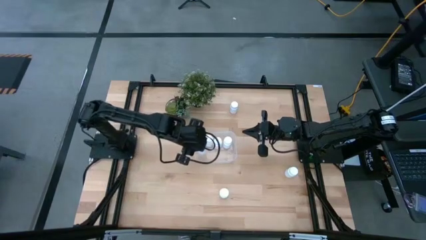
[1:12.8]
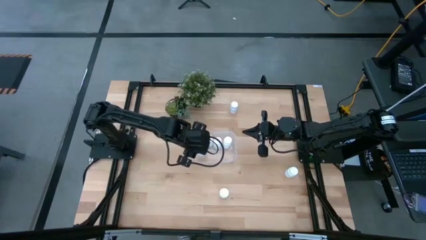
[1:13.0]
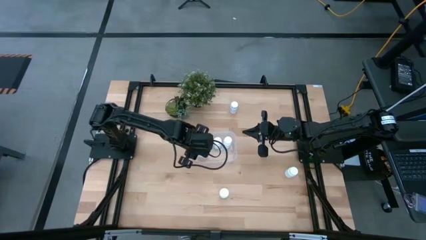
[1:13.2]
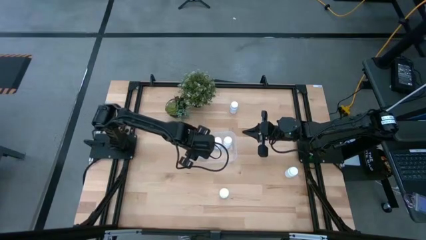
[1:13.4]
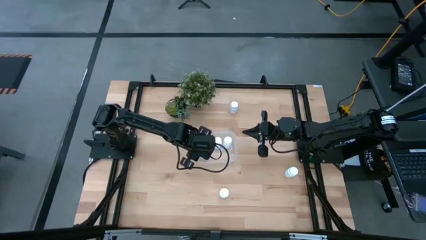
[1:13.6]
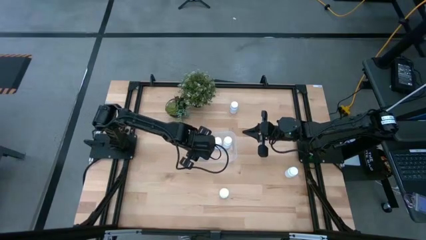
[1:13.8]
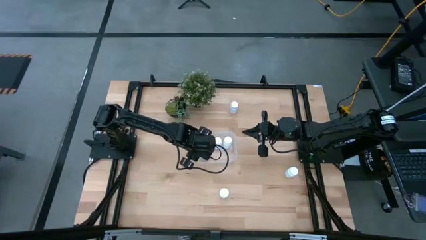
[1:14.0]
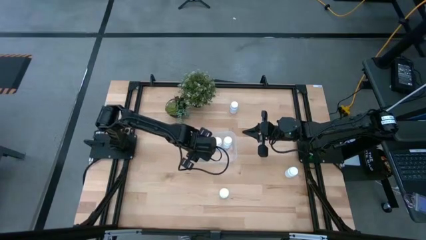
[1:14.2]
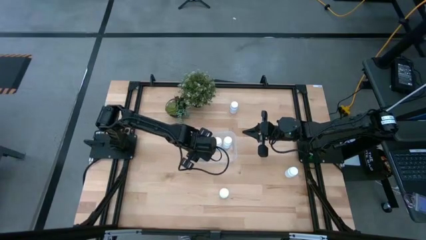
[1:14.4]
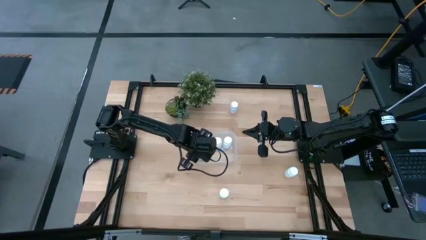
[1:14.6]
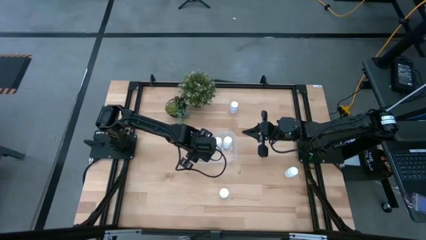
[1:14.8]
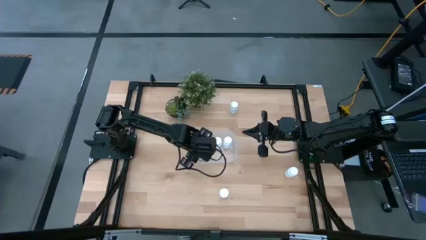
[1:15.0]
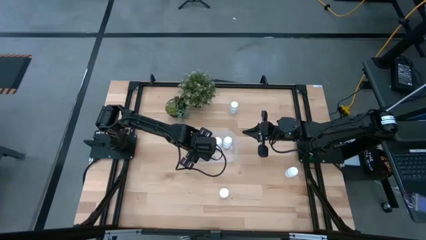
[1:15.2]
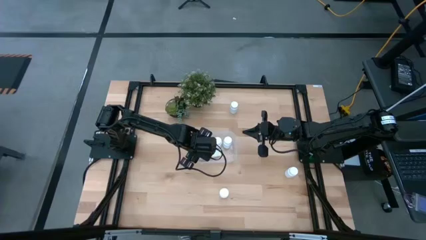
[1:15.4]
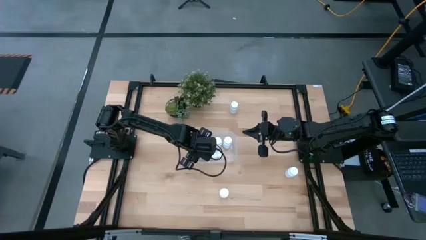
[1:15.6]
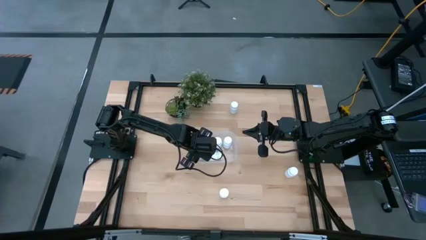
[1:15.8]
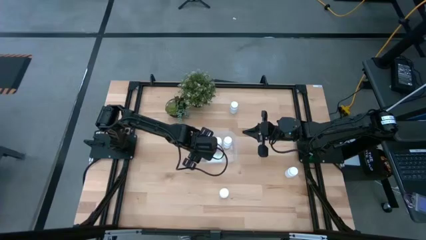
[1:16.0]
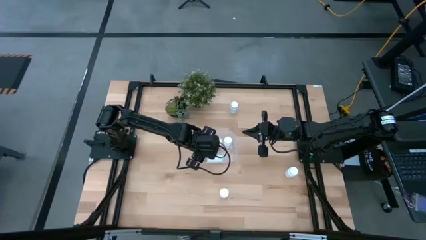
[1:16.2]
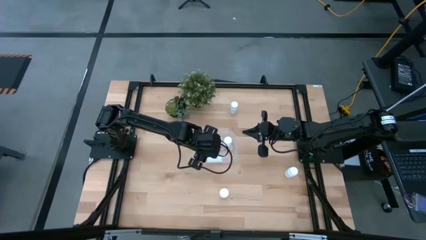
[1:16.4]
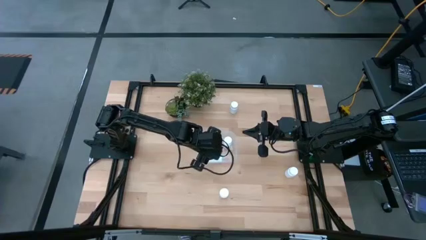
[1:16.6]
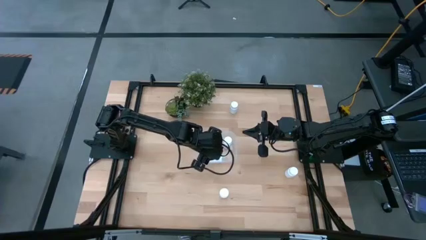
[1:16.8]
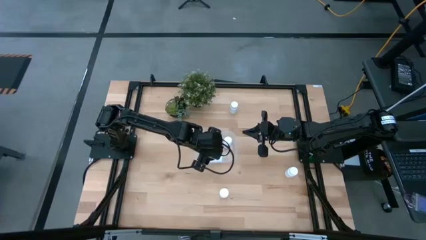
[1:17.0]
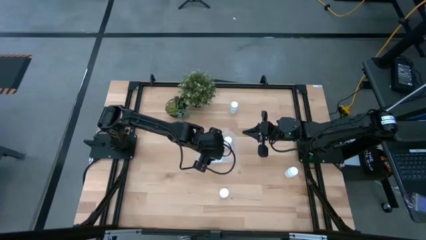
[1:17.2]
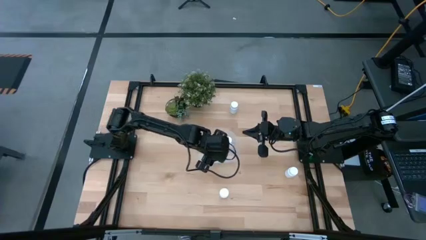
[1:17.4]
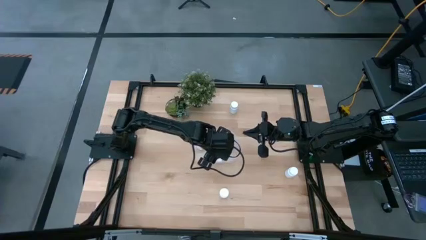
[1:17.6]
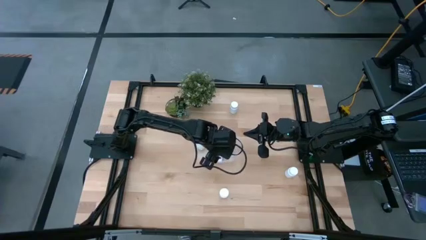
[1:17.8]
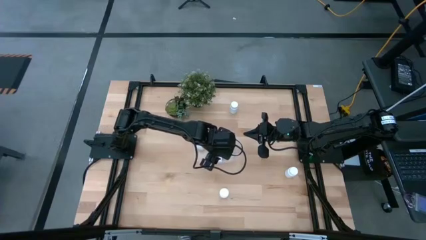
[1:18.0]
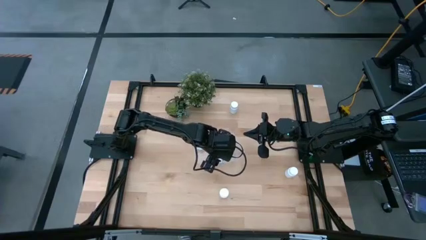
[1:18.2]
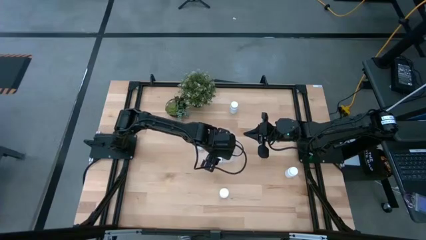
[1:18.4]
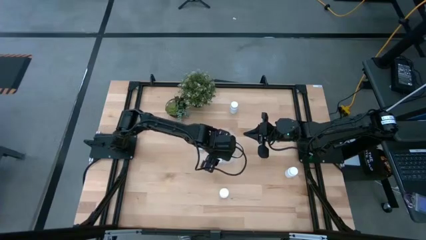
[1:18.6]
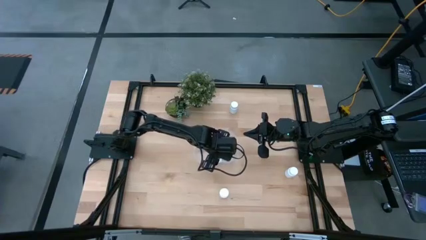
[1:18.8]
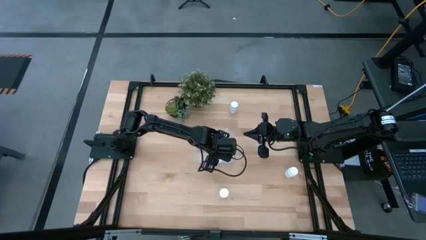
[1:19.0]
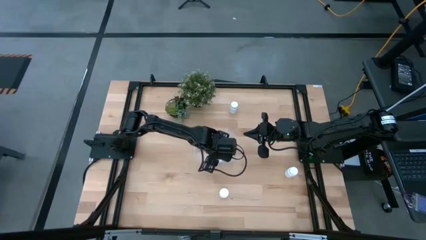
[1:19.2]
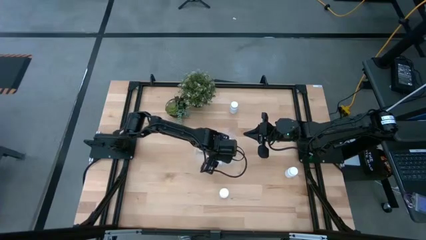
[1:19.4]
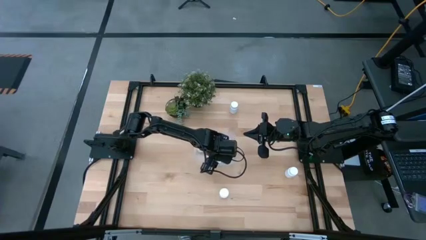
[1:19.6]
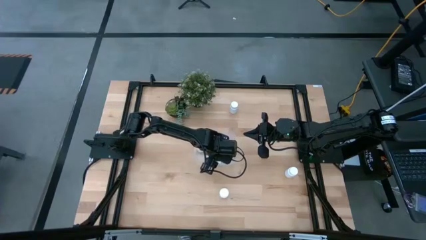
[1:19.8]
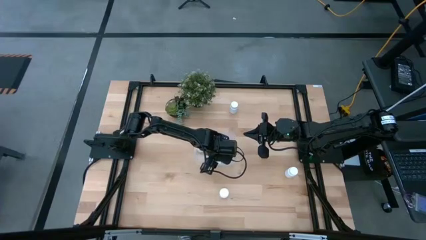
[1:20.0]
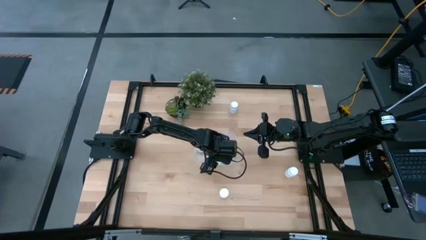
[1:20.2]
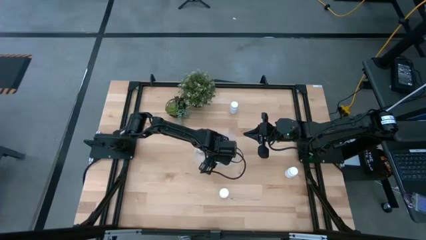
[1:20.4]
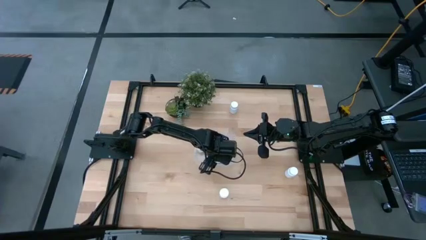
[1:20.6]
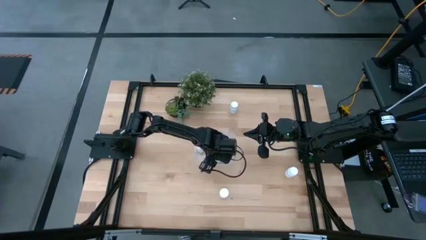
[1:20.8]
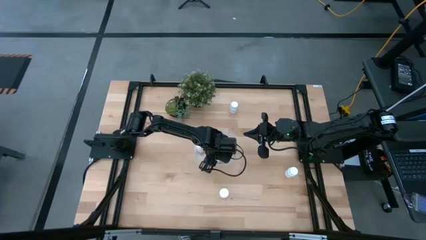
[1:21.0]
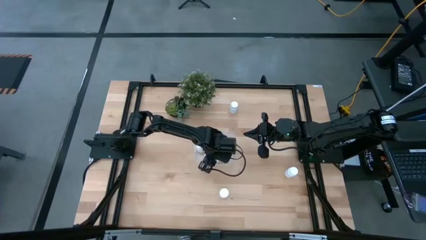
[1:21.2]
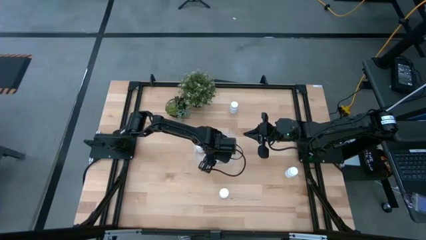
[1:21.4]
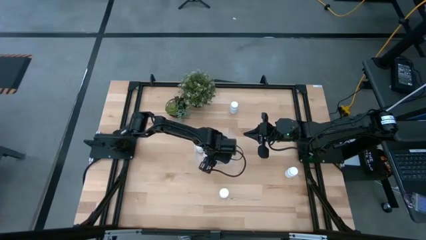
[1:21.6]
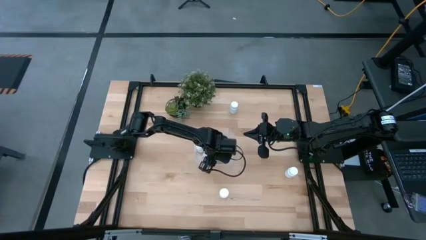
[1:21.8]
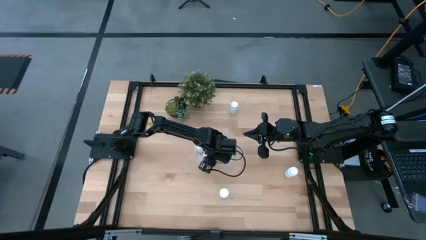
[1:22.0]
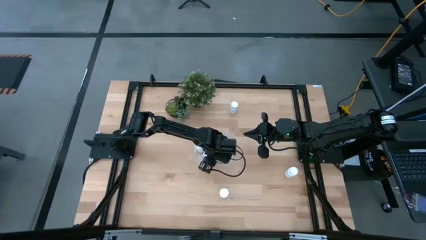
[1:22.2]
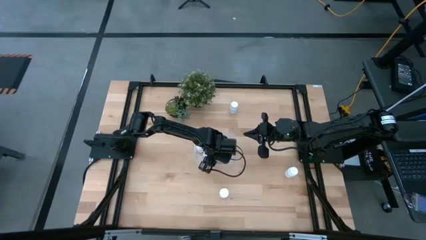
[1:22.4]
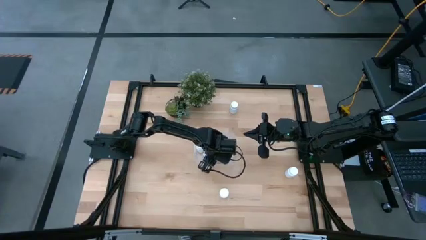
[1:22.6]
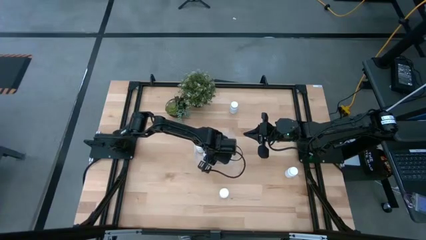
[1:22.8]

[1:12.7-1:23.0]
Task: Pick and place pill bottles into a basket
Put the pill bottle into the bin

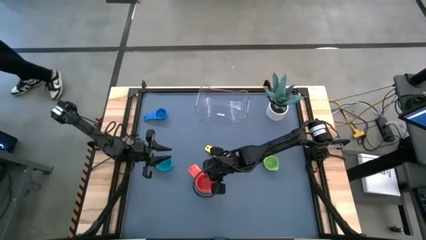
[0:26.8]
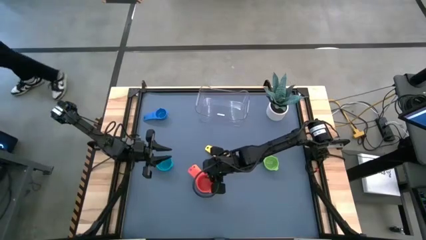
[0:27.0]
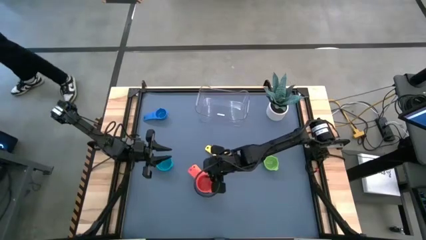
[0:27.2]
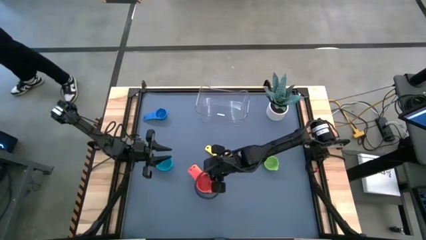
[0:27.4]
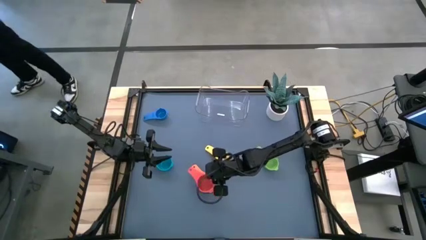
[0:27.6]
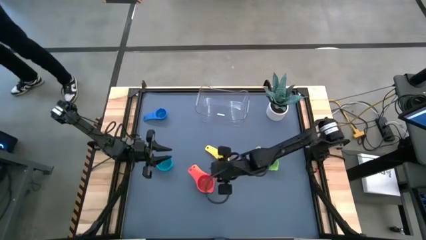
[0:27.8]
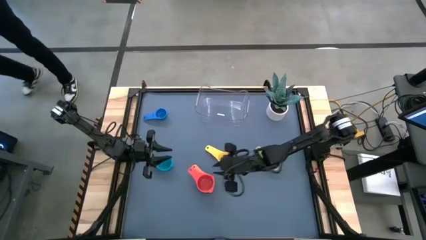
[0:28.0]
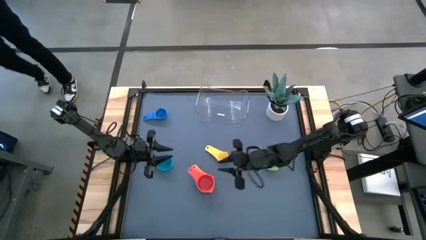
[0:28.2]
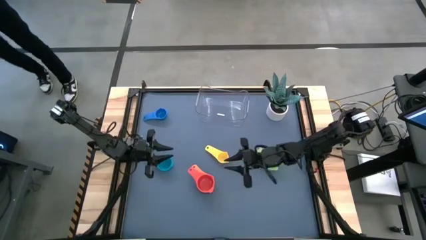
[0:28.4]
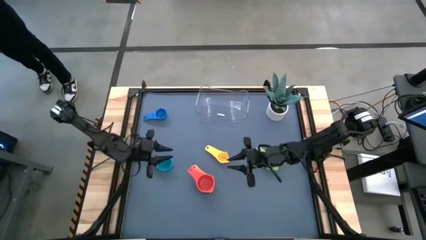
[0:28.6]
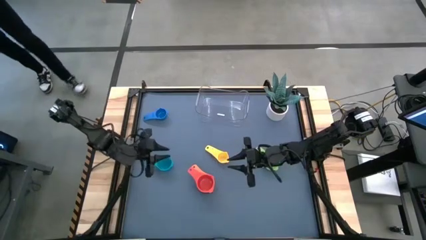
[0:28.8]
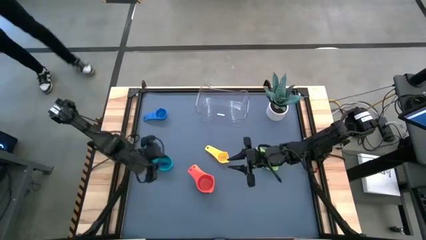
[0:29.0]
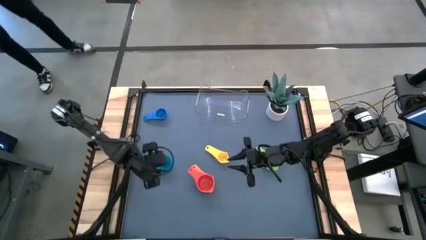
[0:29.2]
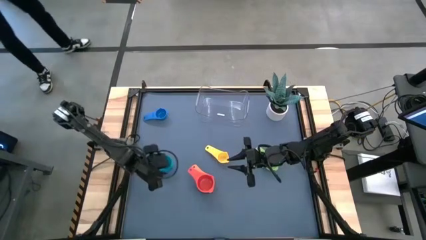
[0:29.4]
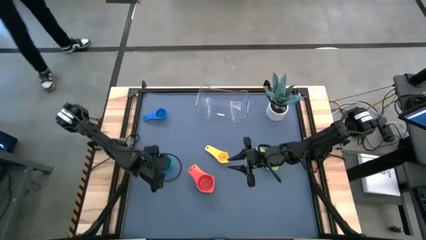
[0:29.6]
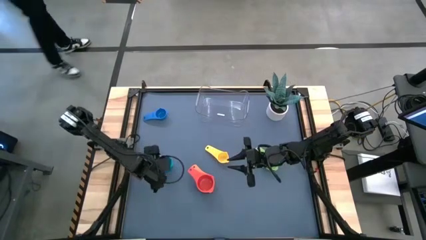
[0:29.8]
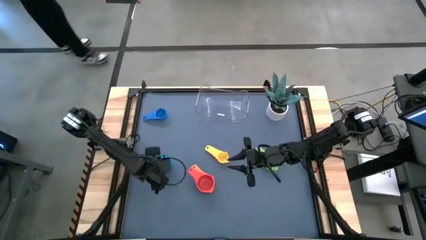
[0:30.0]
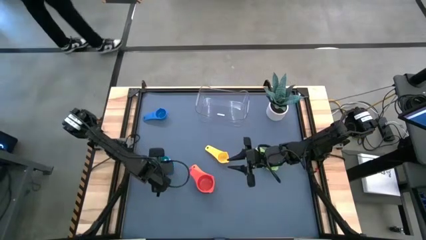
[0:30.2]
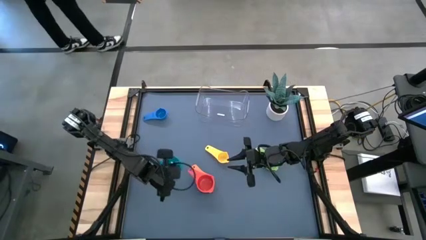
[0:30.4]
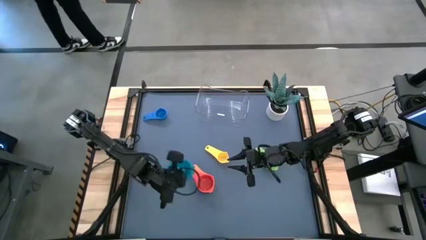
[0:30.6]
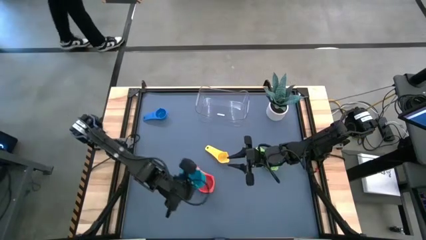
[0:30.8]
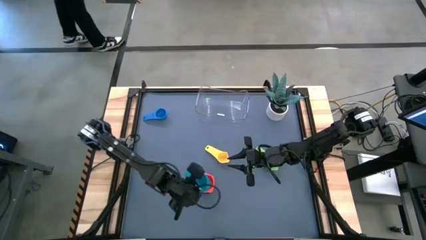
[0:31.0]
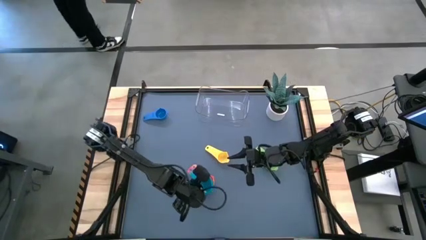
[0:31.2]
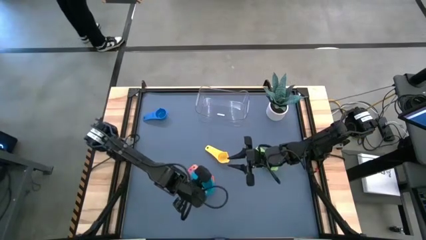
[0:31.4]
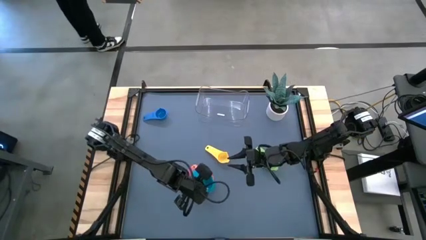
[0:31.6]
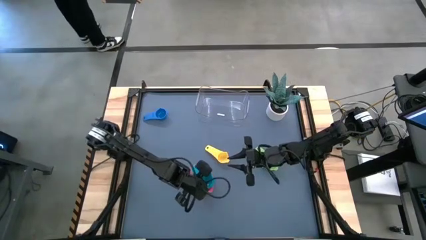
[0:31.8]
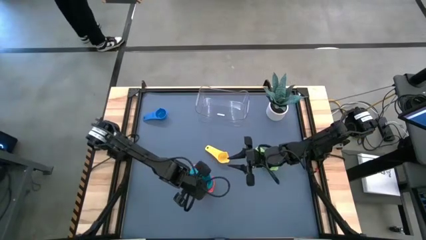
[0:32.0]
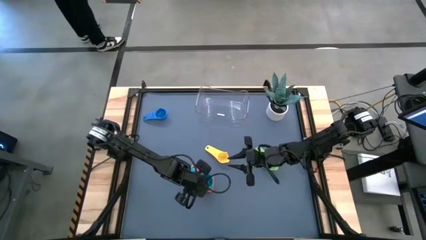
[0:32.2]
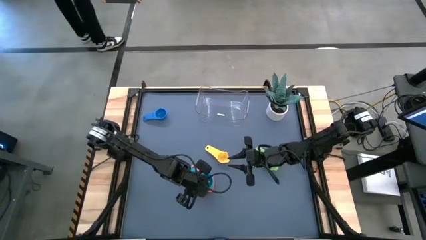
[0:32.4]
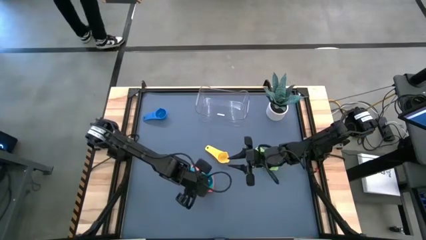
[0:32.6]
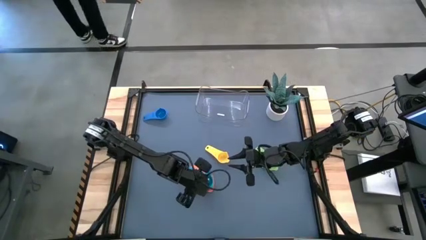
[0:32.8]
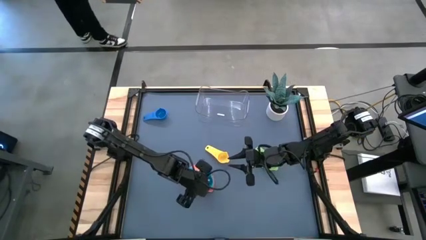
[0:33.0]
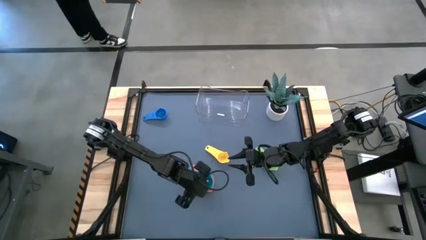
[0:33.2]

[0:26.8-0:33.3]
Task: Nest measuring cups in basket
Stack the light blue measuring cup on top of the red measuring cup
